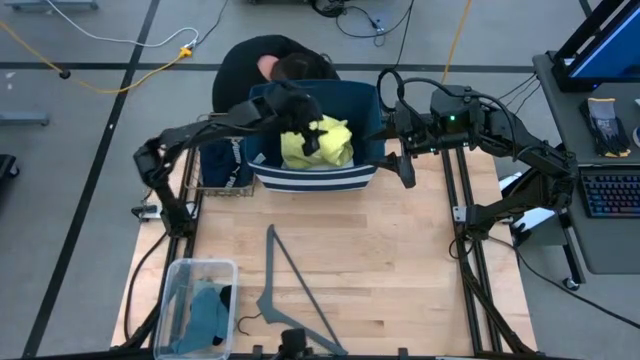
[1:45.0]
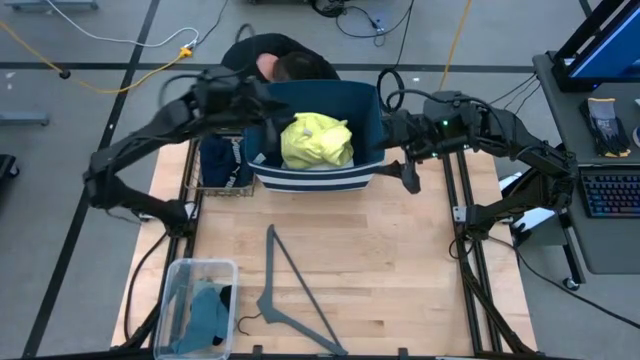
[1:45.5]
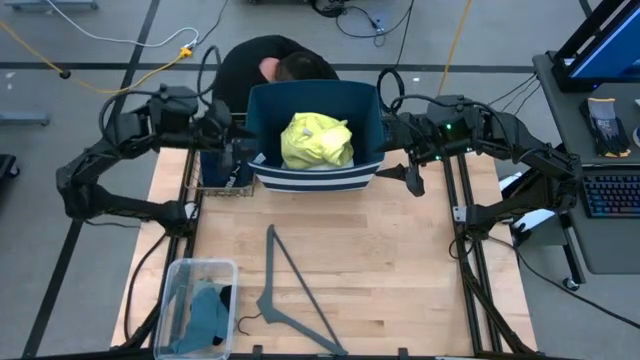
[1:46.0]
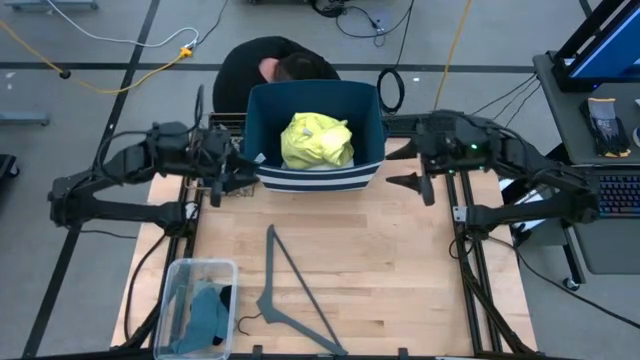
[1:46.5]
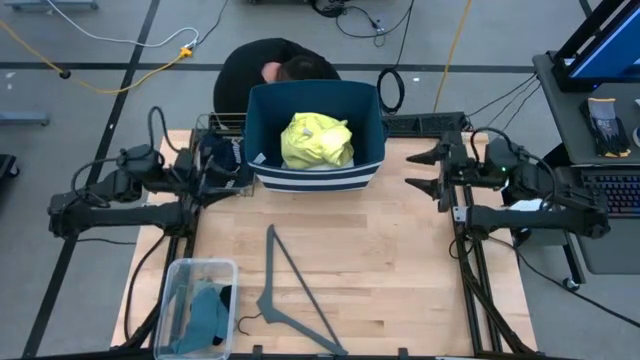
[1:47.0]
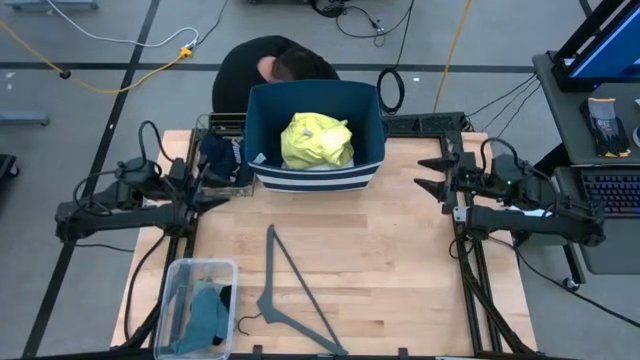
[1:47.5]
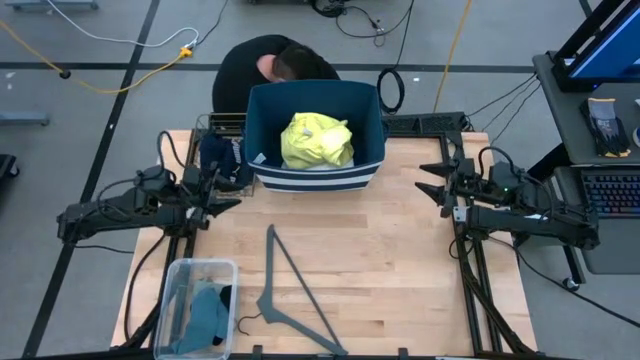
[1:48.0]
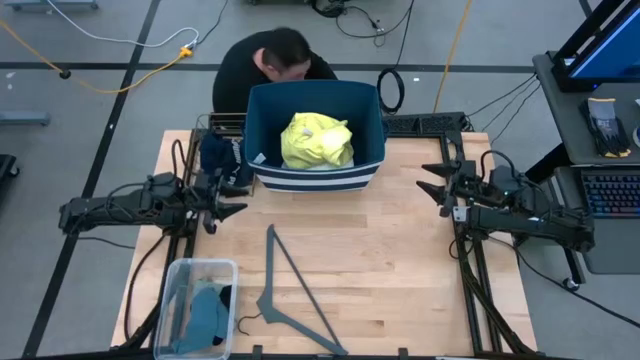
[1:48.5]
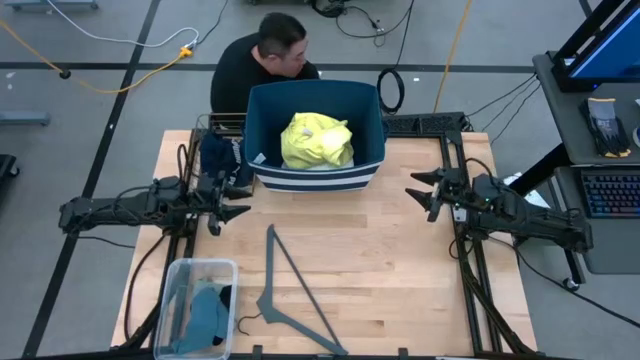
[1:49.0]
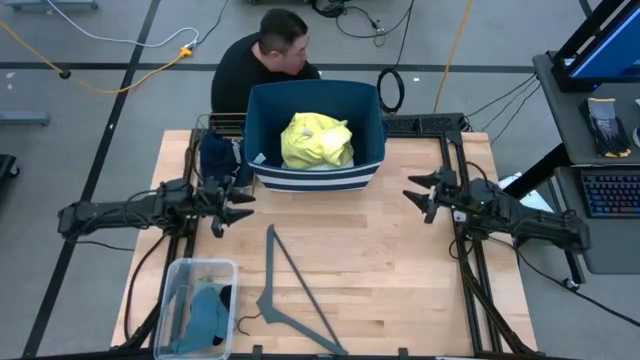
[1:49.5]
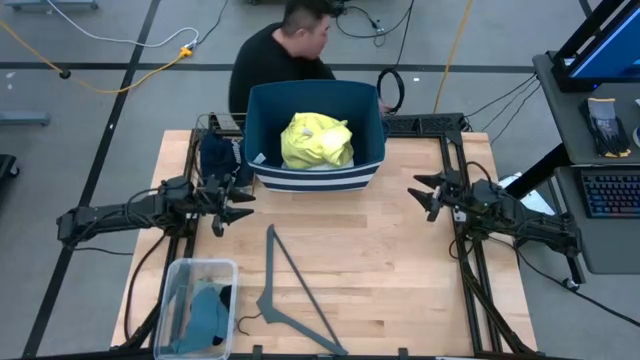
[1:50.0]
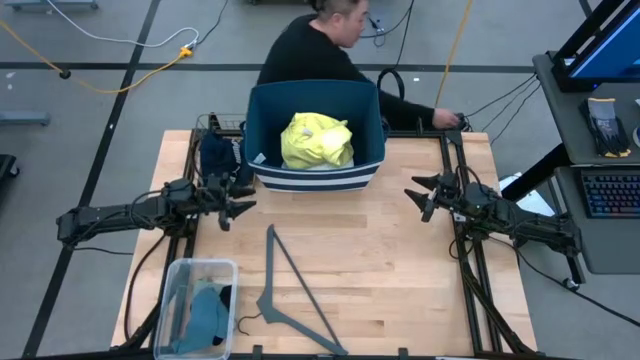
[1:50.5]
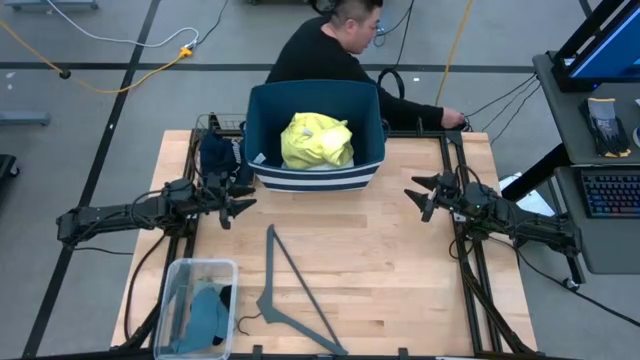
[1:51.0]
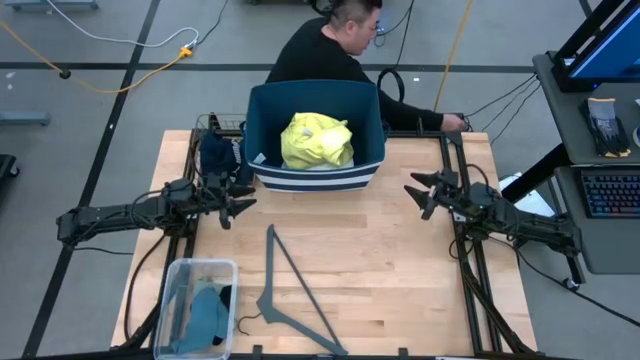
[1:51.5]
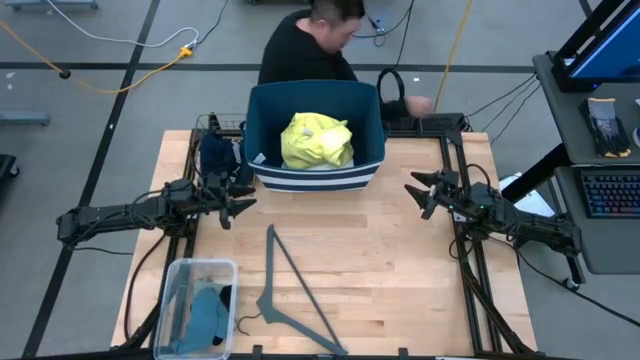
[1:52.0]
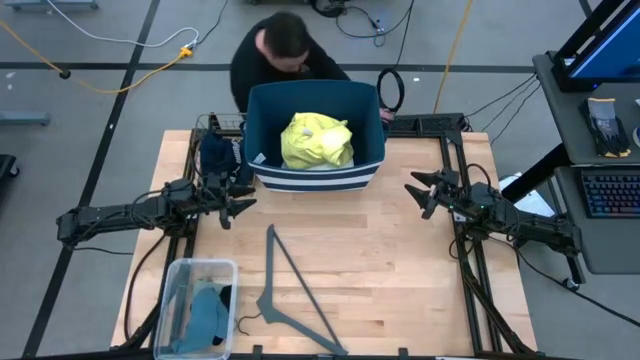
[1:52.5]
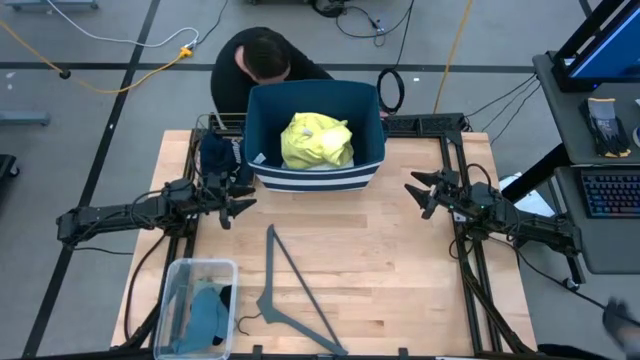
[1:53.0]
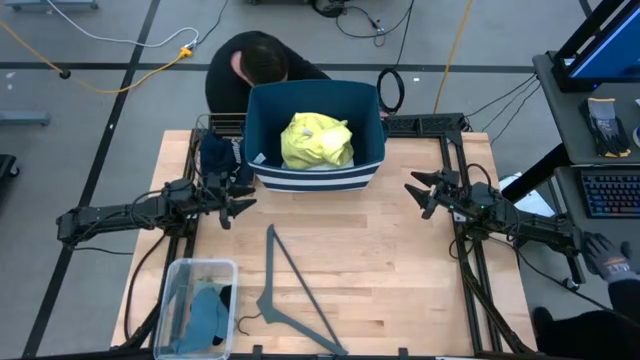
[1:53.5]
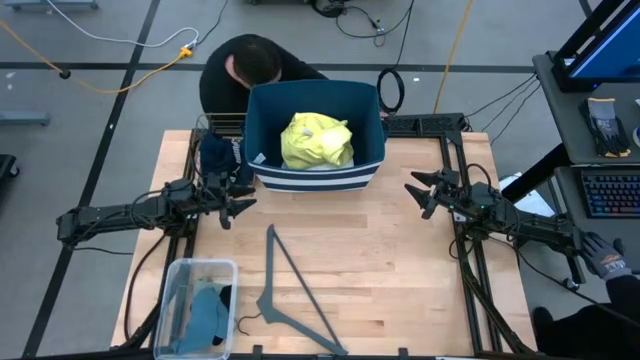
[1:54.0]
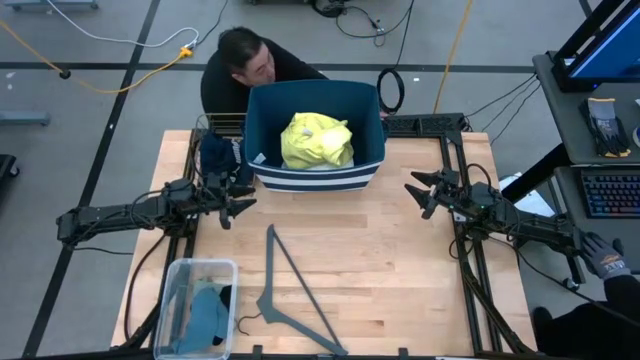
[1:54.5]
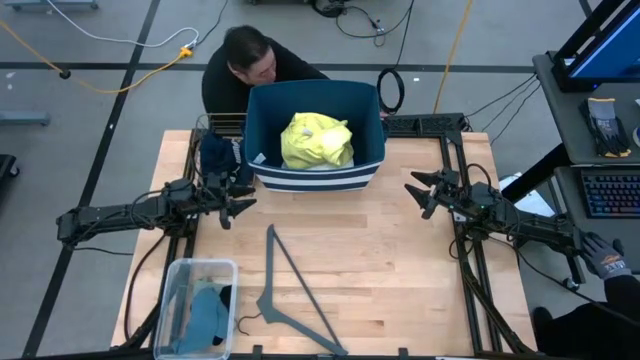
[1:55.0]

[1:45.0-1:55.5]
Task: Pick & Place Cloths
Return to Home Position

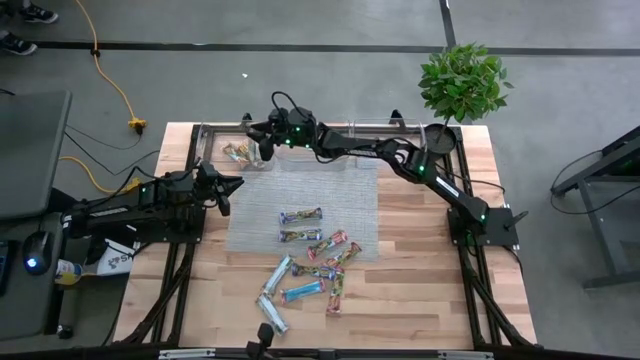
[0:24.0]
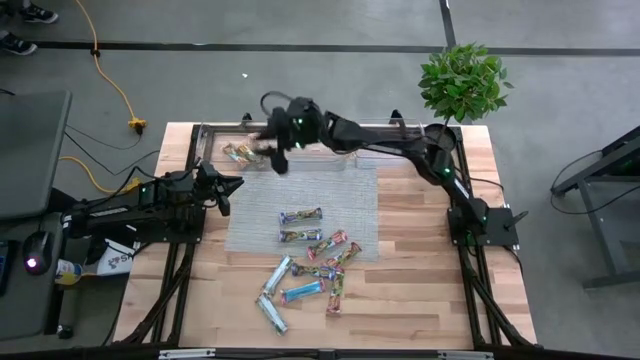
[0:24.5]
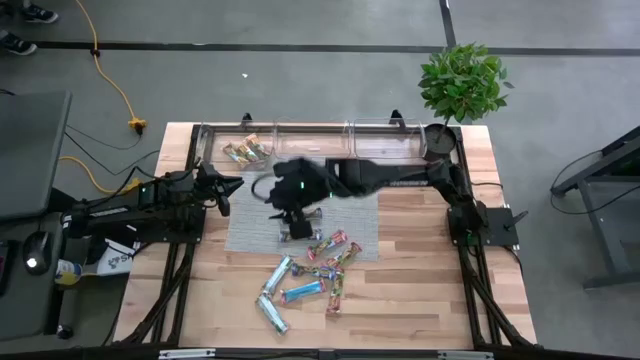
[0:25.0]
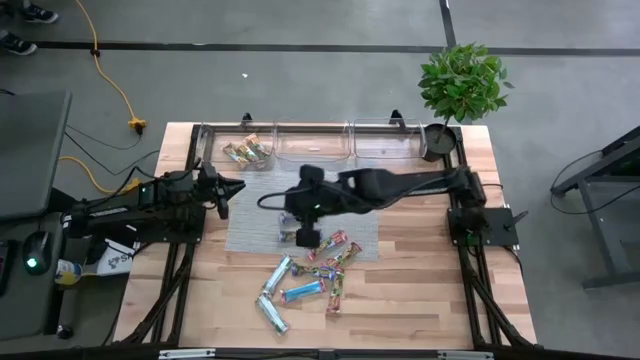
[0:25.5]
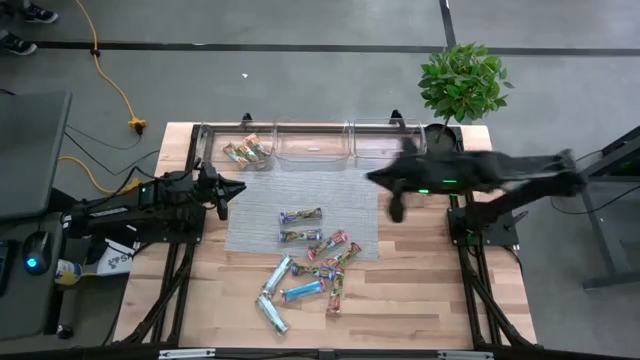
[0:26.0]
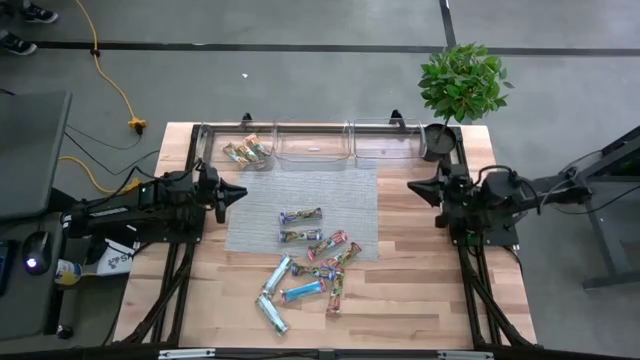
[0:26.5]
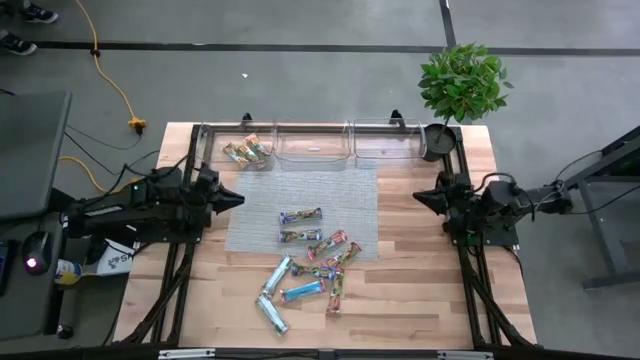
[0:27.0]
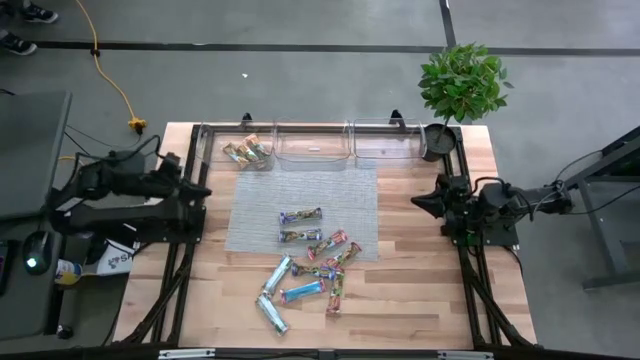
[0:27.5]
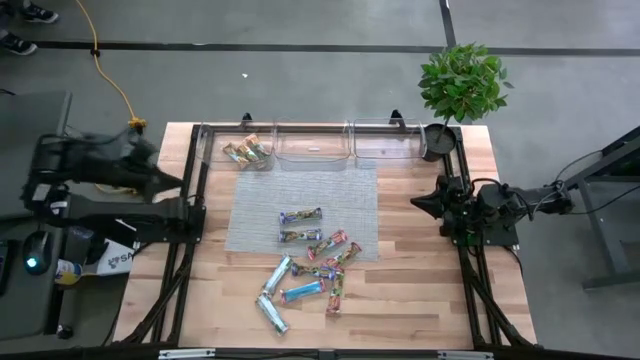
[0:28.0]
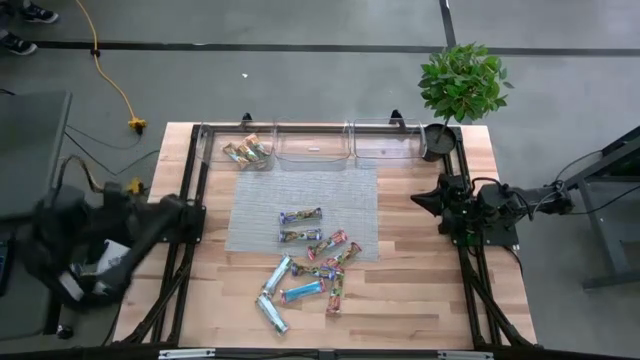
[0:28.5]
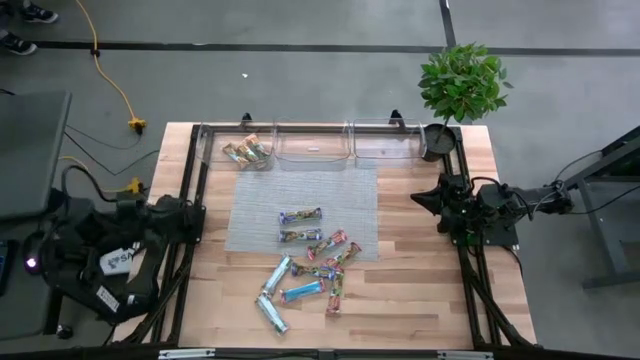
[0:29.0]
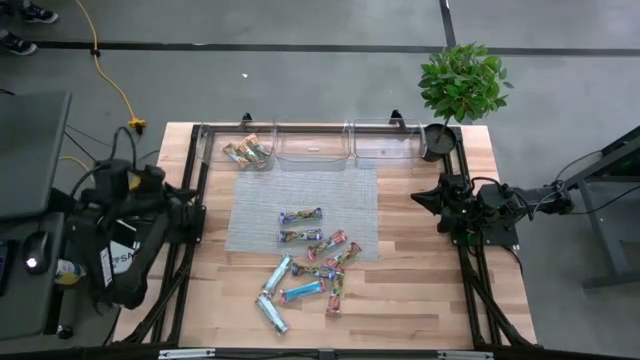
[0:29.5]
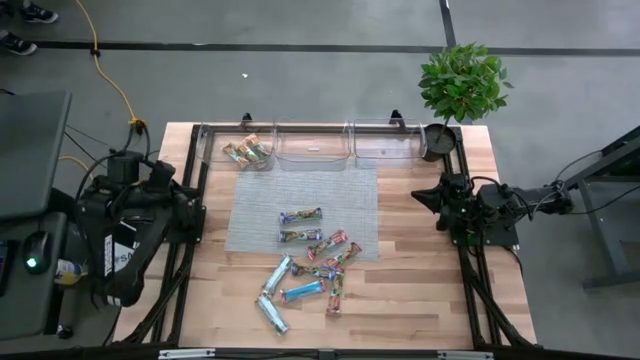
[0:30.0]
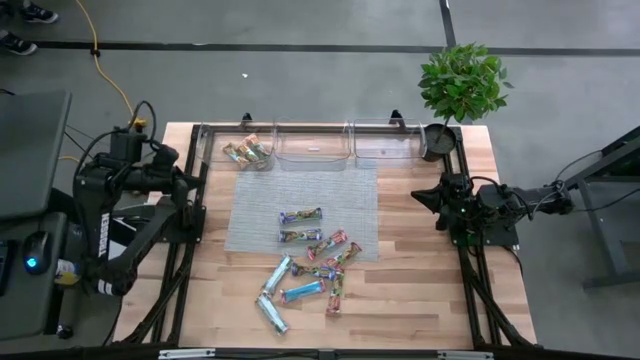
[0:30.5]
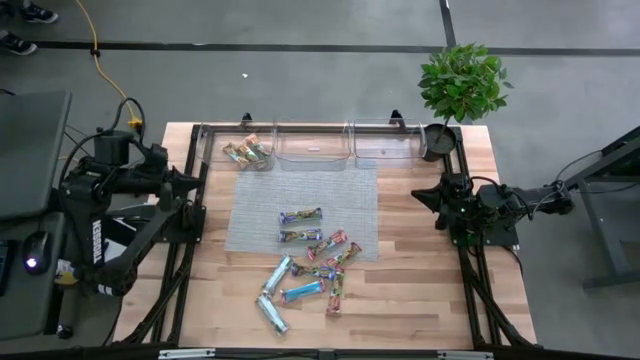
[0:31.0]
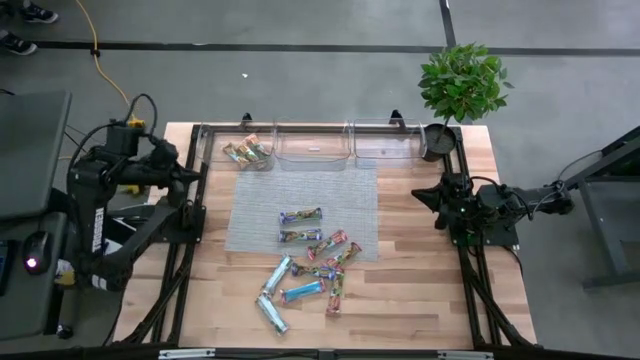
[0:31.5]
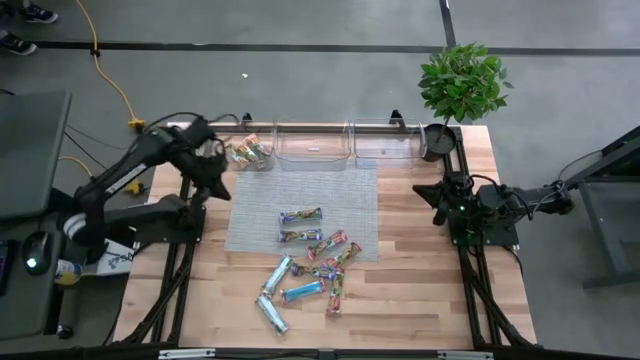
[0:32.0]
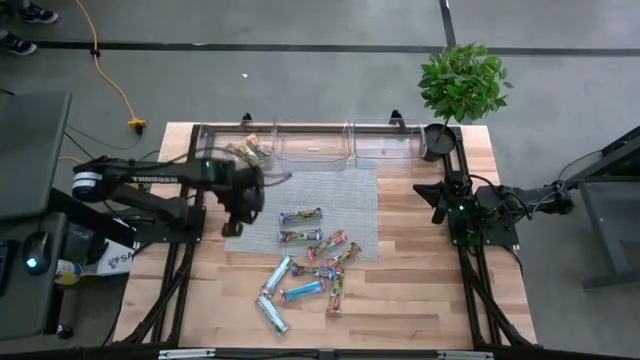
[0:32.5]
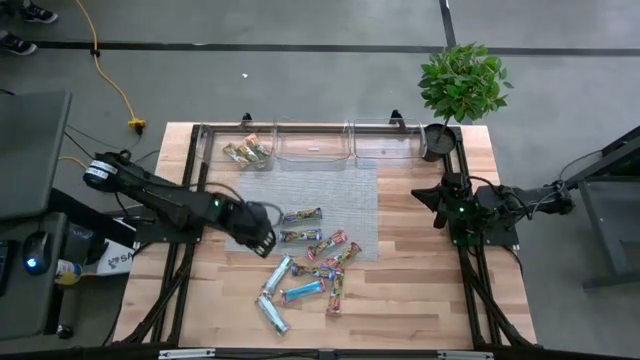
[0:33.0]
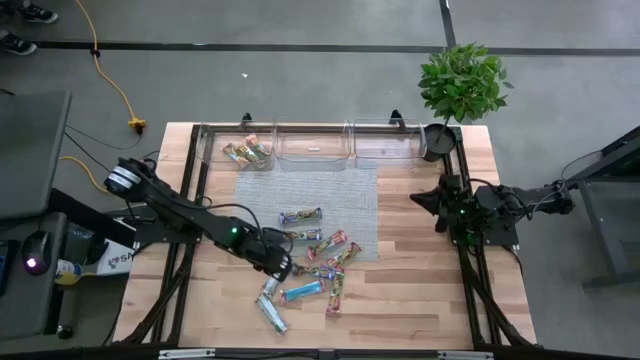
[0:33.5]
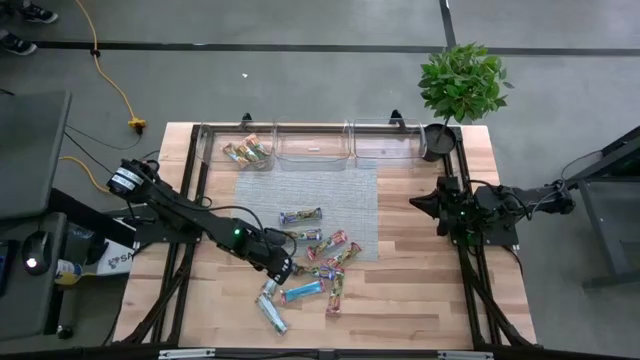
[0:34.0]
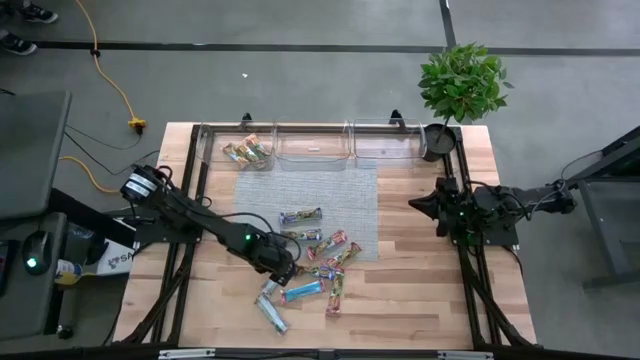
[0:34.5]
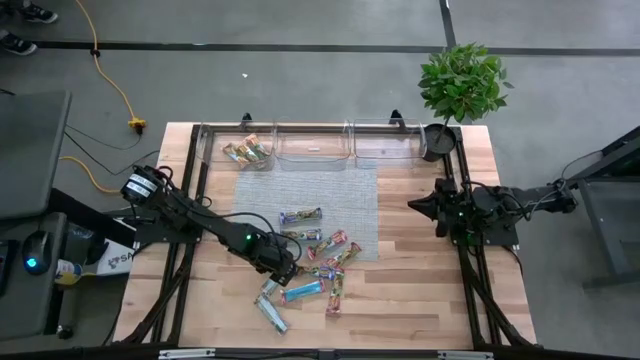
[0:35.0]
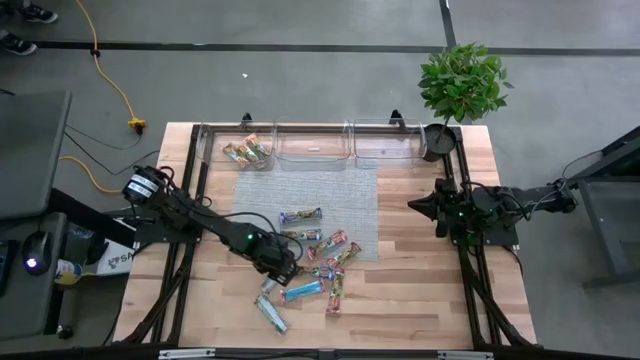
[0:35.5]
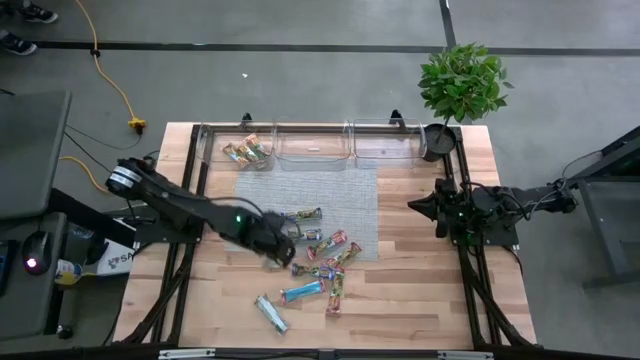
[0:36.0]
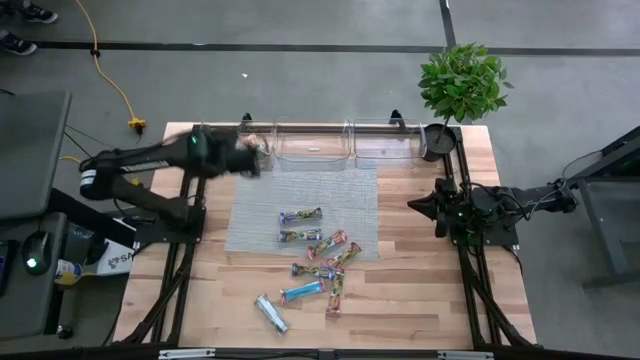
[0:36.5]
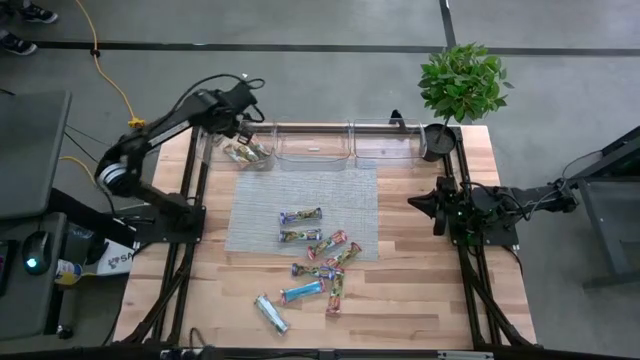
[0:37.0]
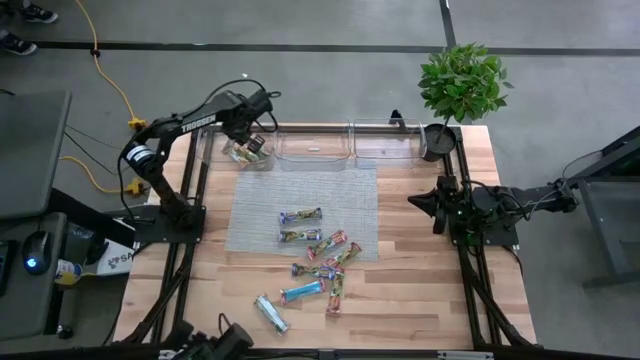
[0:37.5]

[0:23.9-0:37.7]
Task: Pick and place Granola Bars by type
Put the yellow granola bar into the left transparent bin
